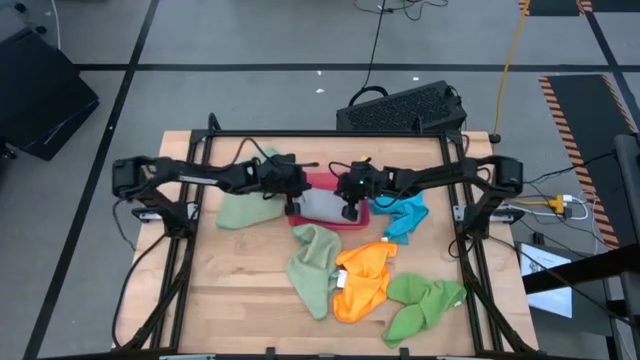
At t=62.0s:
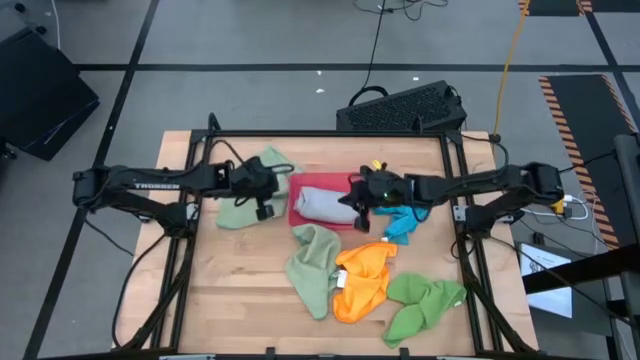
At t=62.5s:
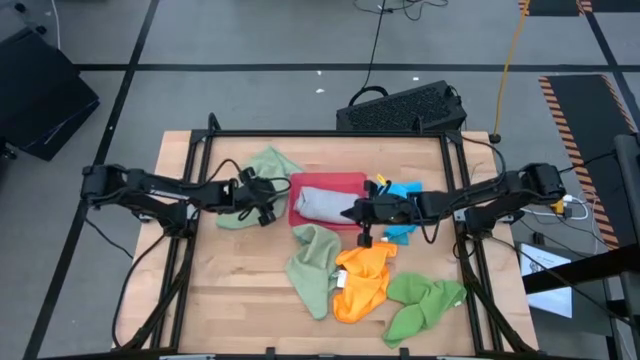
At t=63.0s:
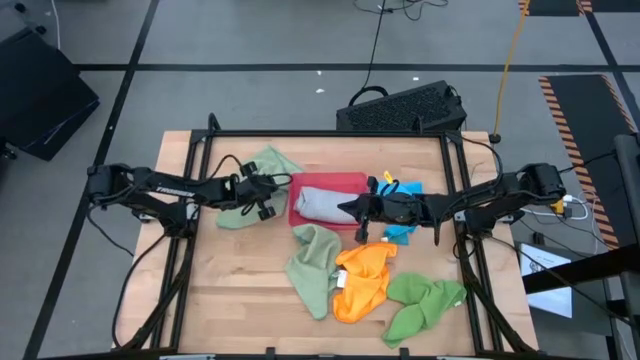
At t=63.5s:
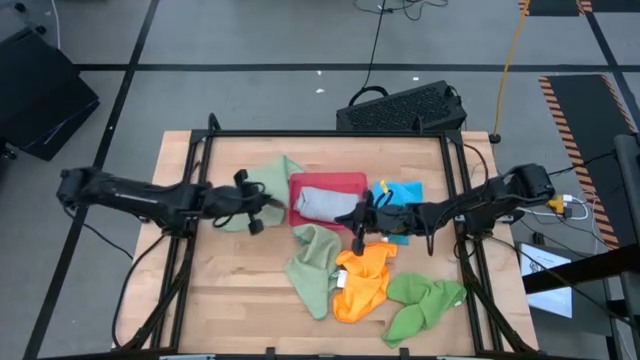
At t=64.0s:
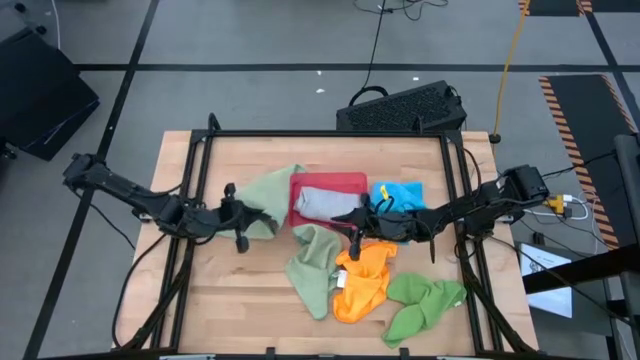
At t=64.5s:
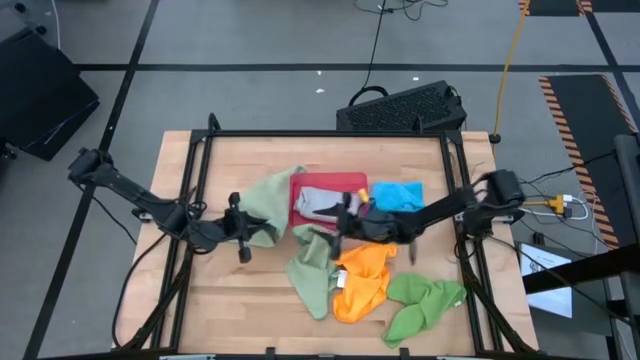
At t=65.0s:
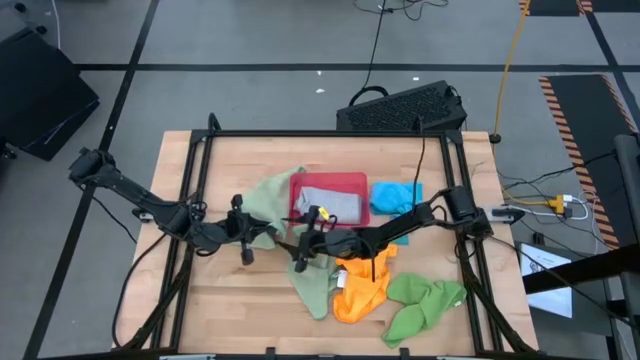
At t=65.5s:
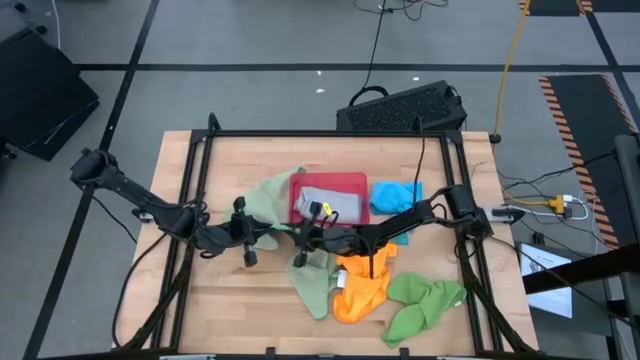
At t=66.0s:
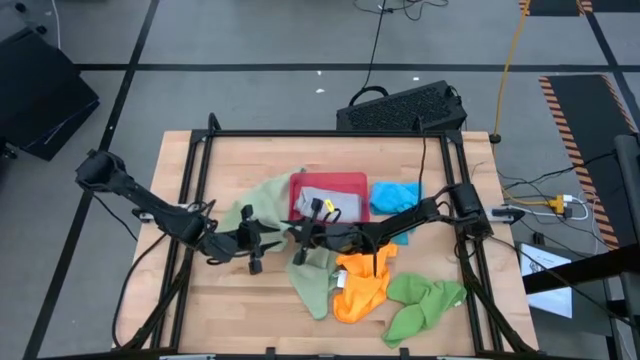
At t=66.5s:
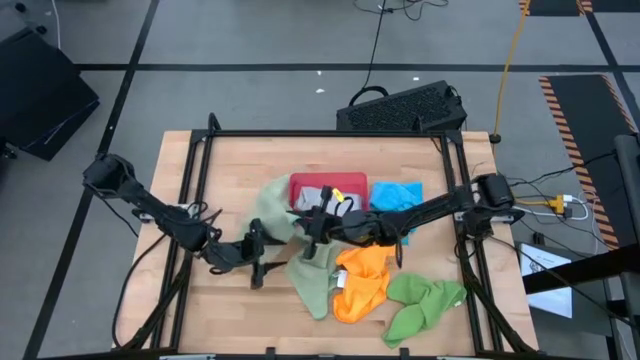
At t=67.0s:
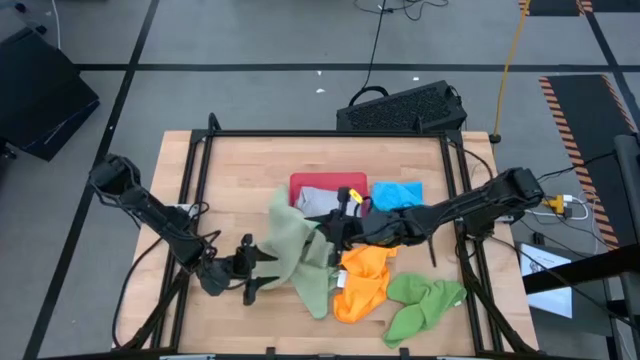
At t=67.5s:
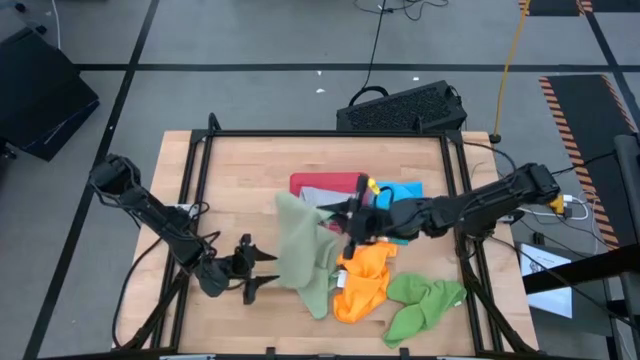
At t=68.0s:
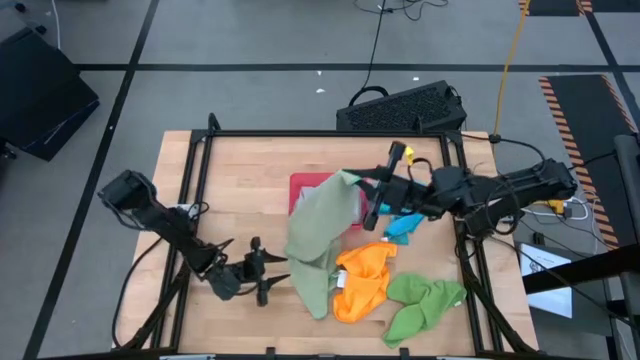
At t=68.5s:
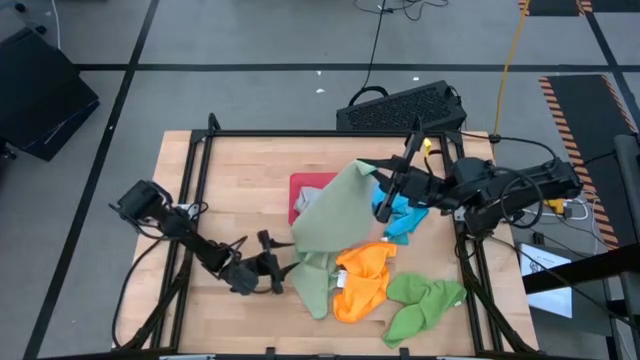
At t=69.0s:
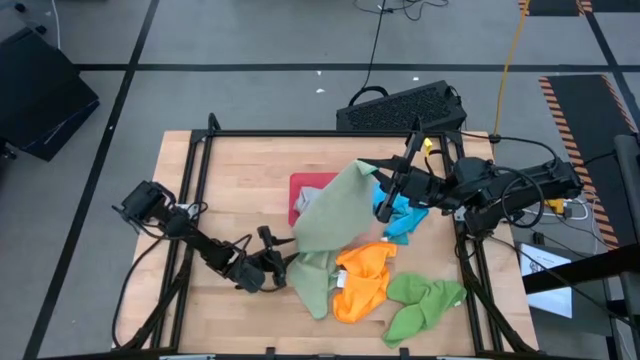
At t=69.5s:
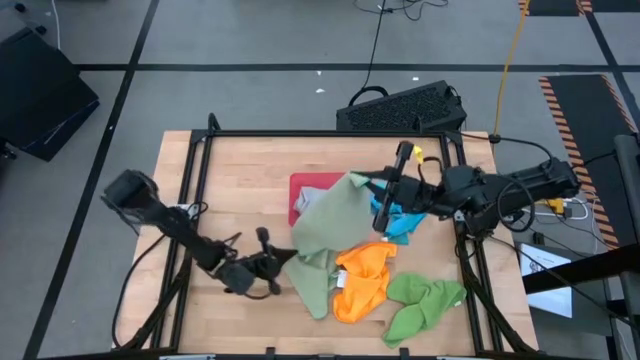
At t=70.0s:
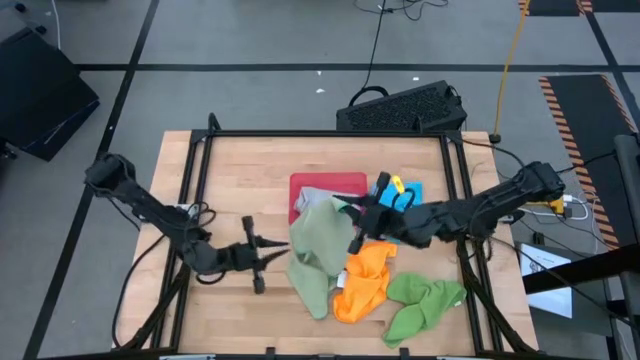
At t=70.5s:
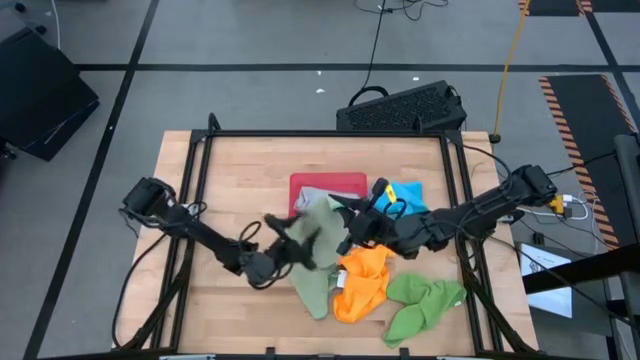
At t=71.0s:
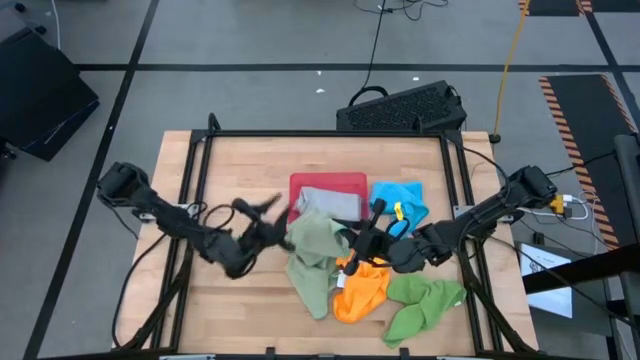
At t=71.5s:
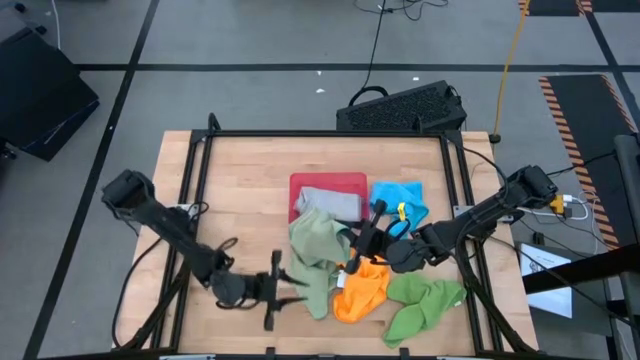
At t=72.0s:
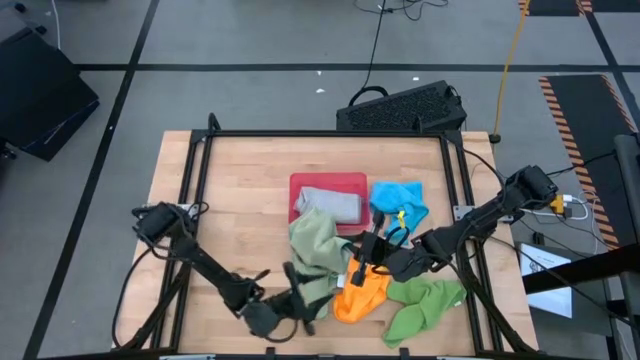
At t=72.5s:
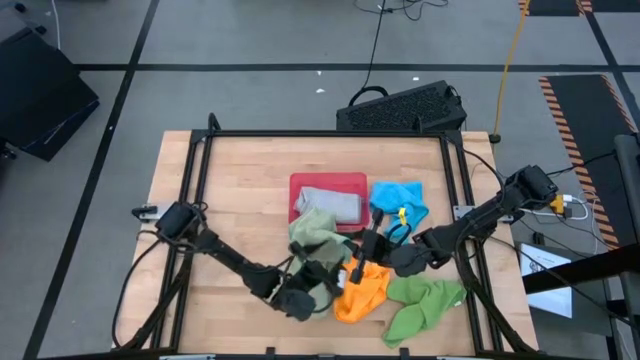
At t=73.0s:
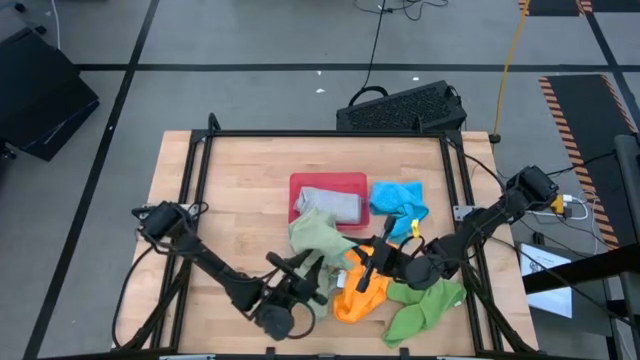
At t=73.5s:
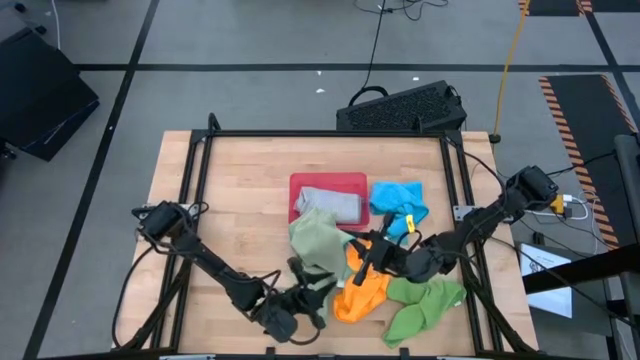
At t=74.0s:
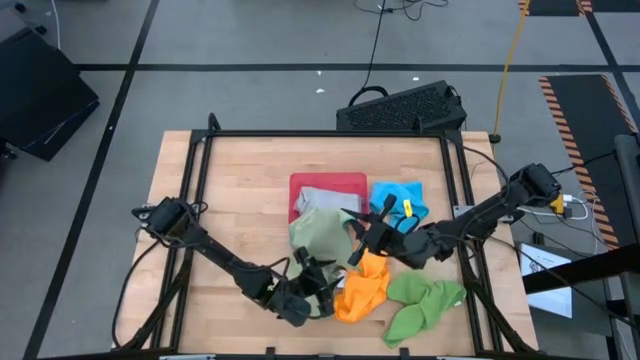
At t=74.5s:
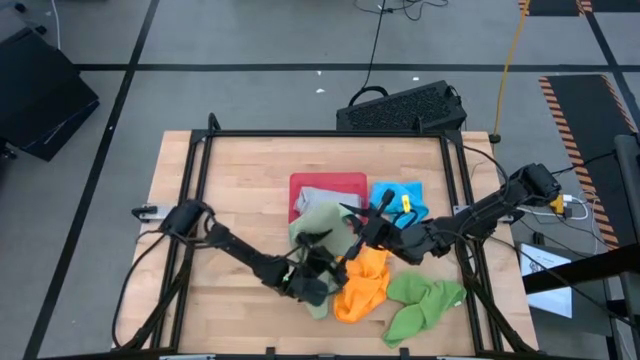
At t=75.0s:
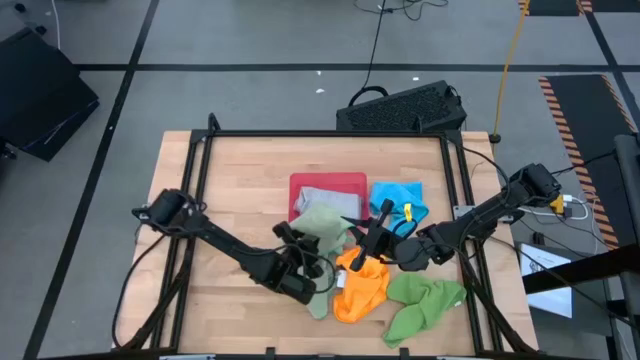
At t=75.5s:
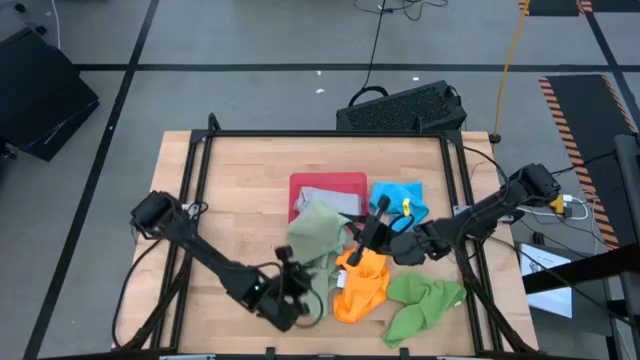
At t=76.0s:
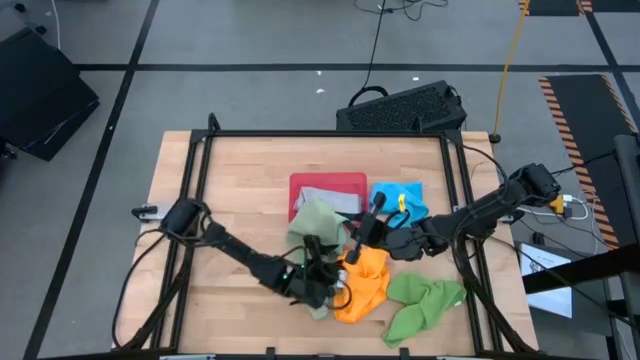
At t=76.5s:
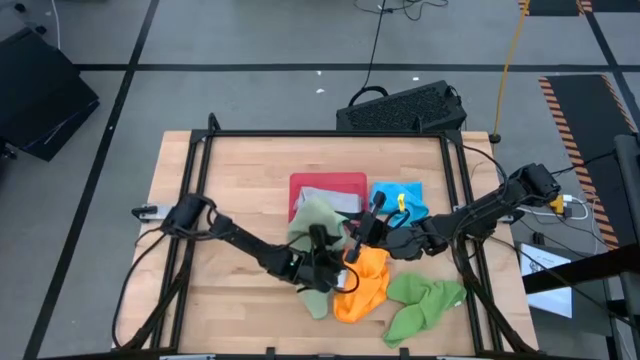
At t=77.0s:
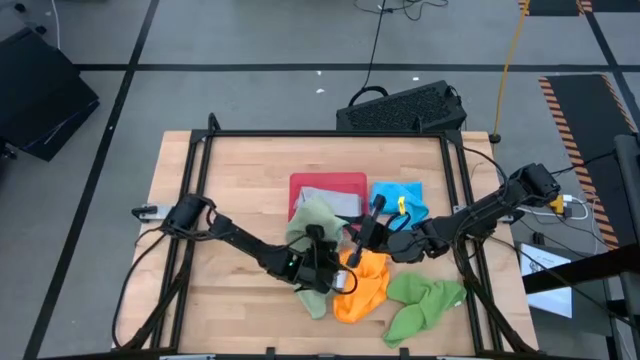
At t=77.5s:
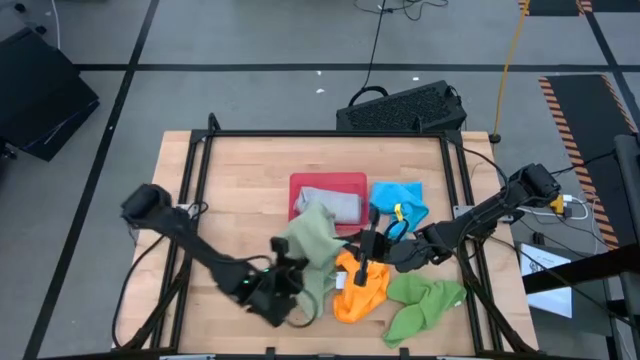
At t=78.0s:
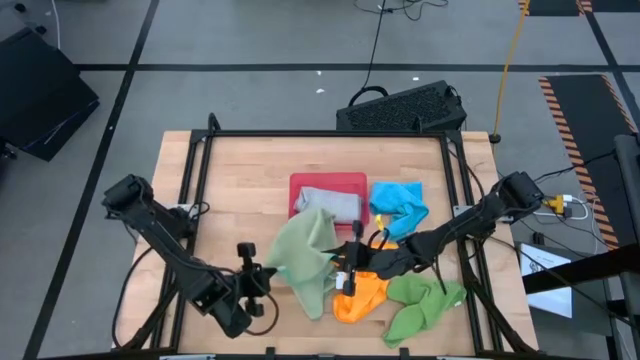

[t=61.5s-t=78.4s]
Task: Fold microfiber towels
Fold the light green microfiber cloth
